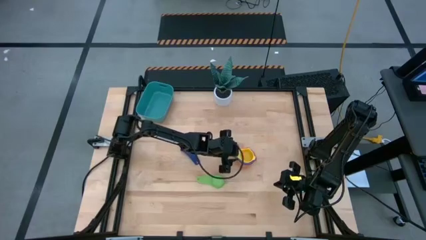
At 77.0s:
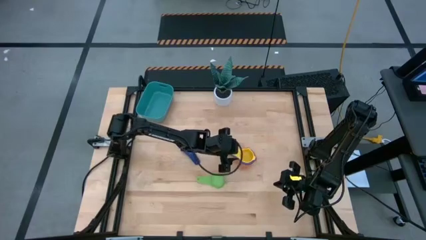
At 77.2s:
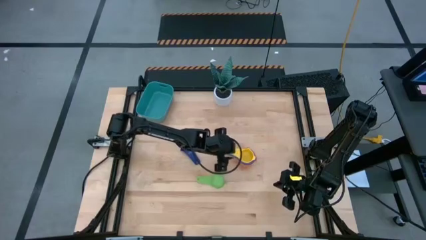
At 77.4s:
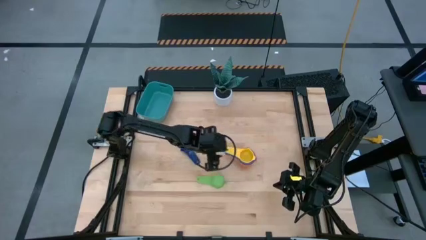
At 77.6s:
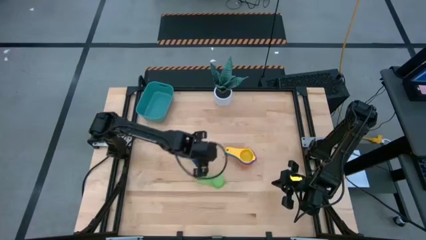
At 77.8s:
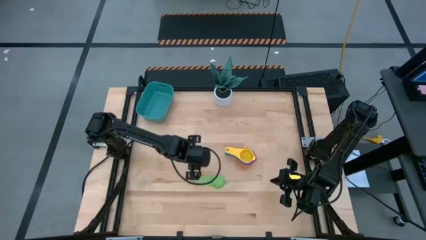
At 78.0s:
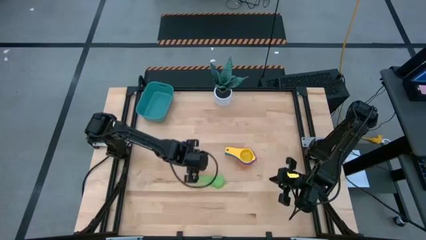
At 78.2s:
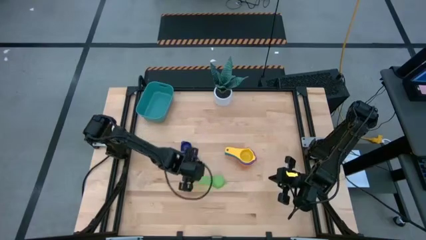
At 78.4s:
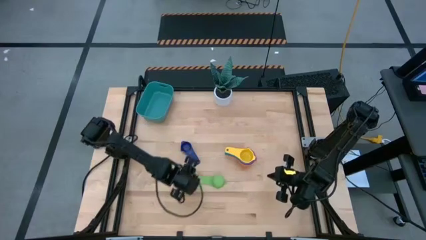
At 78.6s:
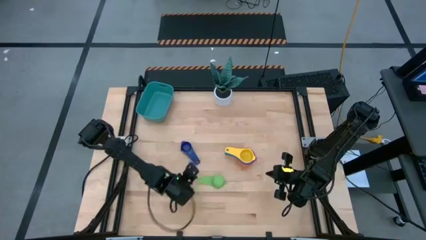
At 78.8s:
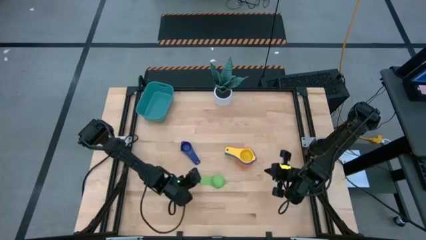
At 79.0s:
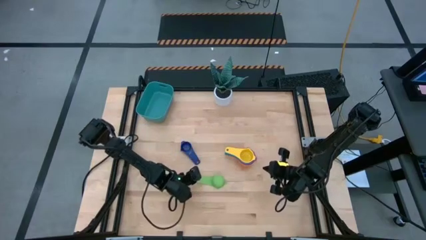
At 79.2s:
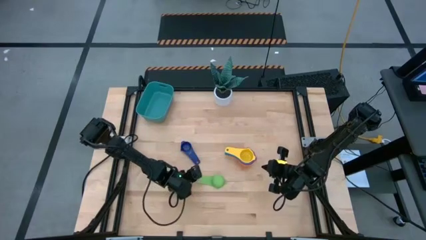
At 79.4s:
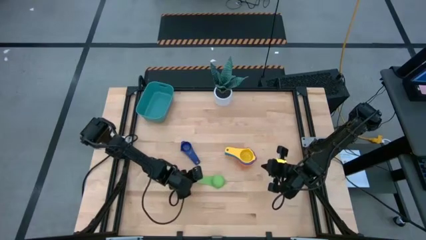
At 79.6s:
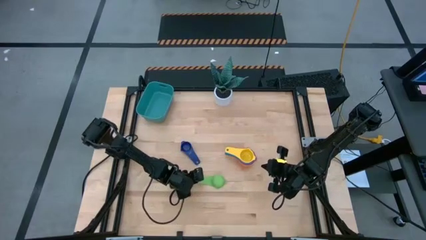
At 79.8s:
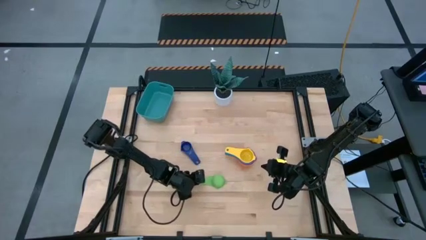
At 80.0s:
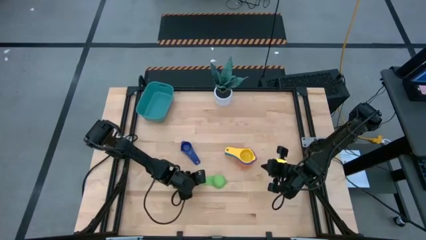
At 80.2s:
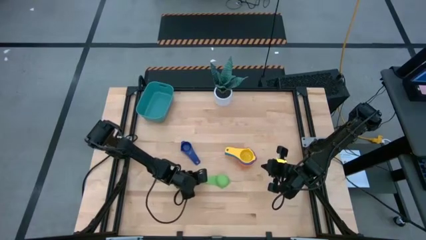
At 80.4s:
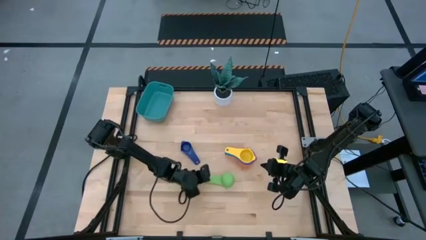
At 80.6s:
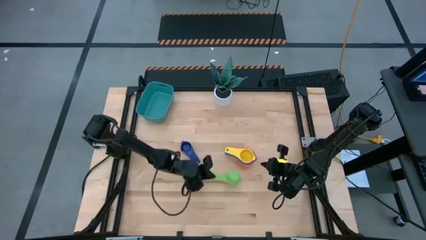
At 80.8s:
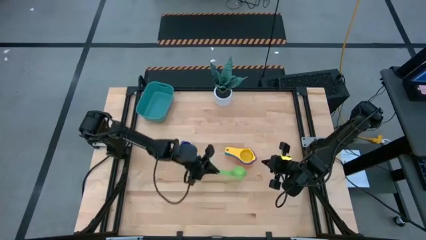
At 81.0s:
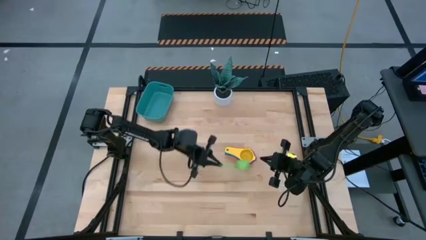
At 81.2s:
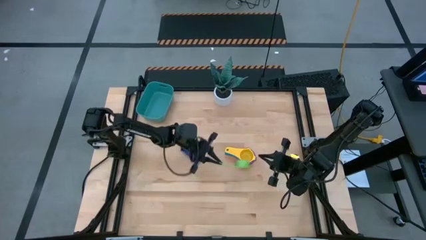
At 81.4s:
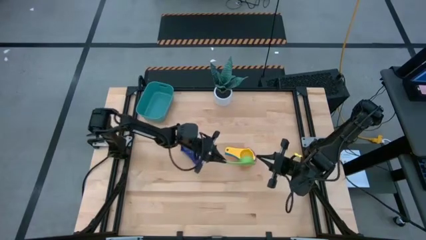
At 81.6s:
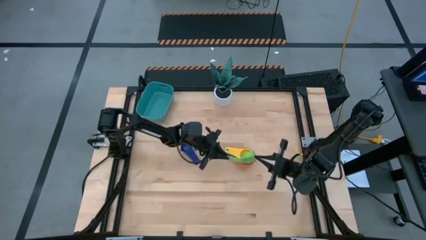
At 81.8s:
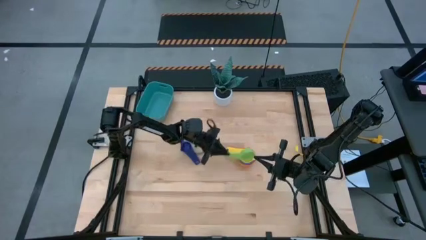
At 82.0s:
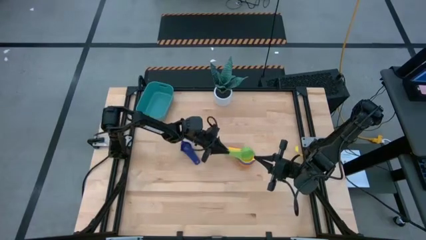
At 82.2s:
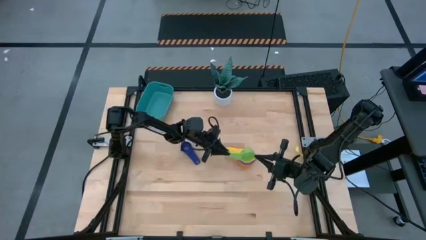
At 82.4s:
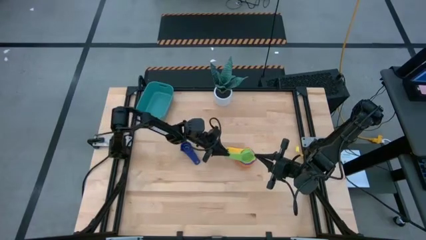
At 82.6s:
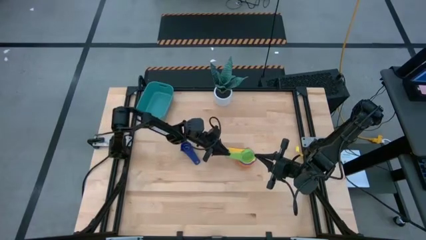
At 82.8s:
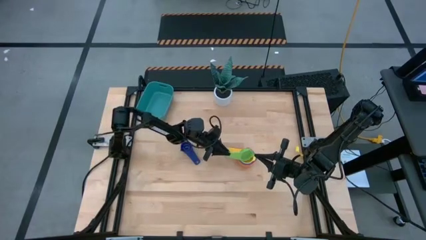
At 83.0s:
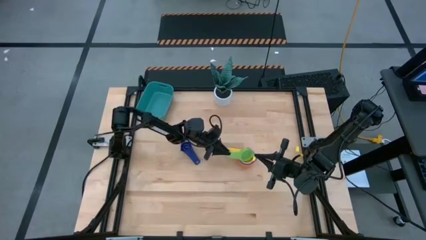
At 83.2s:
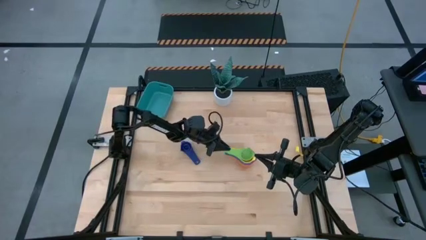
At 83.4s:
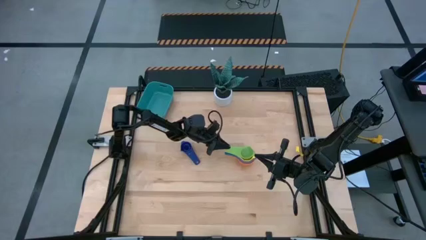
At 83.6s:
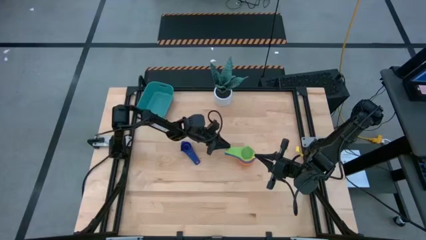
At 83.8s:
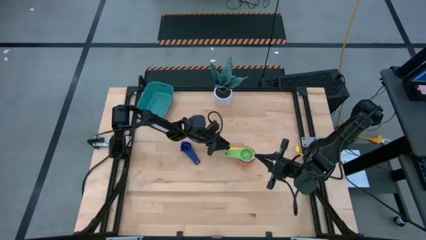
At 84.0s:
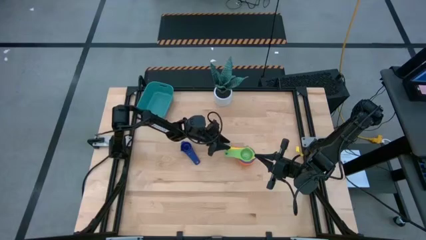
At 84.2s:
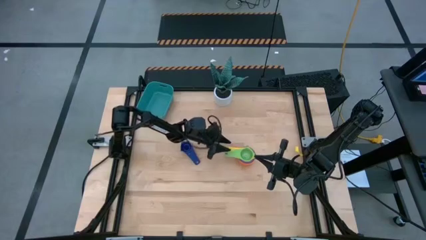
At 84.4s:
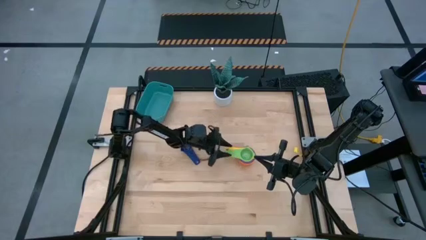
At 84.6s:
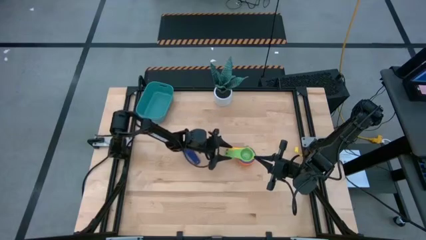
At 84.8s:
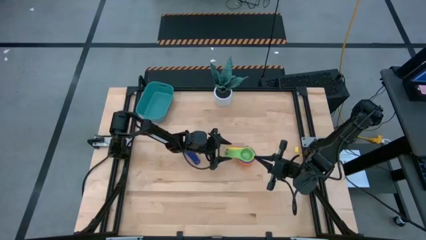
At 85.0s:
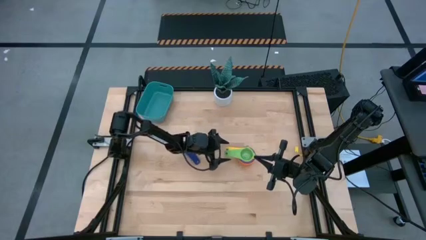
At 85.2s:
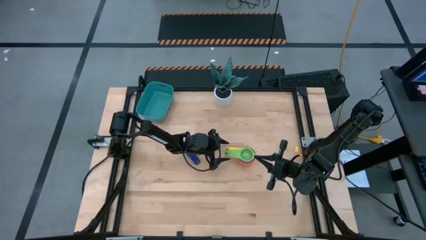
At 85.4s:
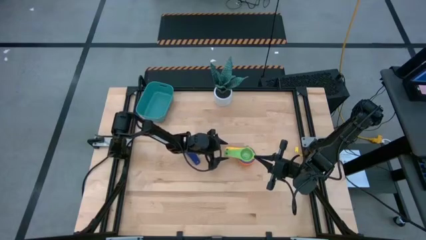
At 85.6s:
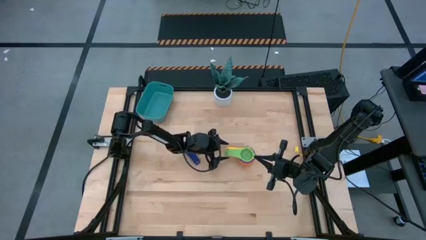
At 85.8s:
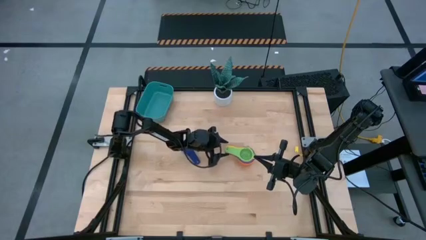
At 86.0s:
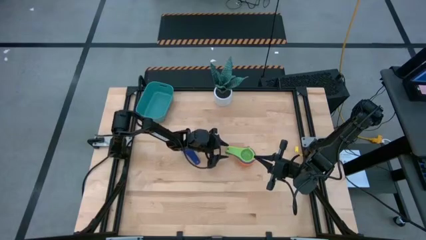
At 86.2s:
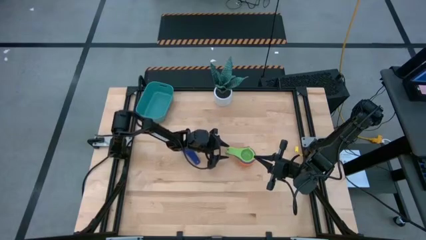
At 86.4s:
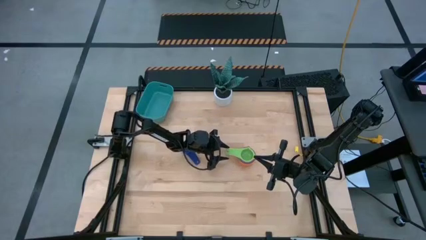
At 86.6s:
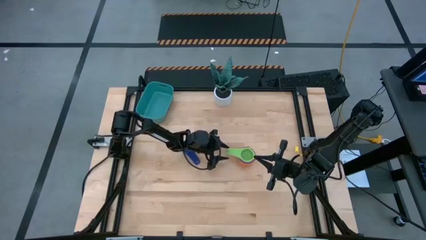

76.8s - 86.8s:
Task: Nest measuring cups in basket
Stack the green measuring cup on top of the yellow measuring cup

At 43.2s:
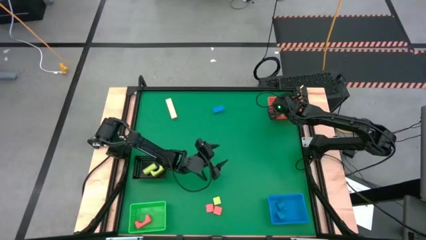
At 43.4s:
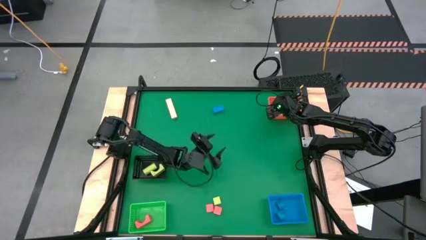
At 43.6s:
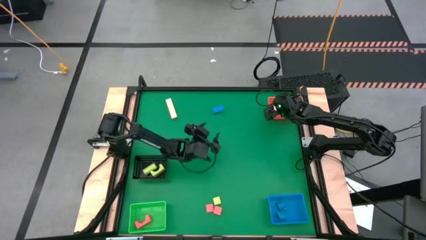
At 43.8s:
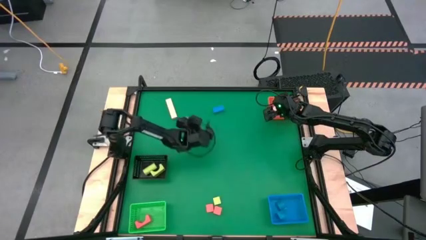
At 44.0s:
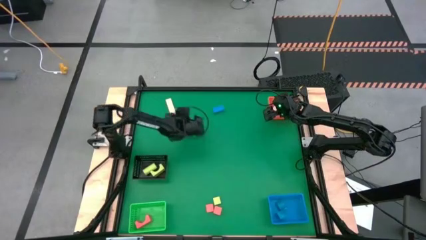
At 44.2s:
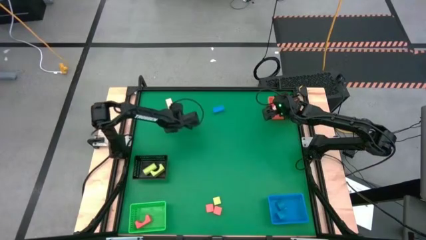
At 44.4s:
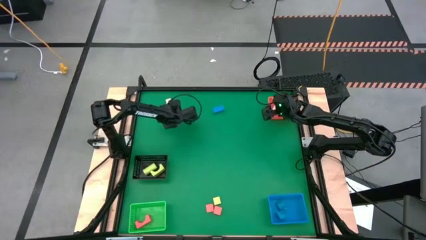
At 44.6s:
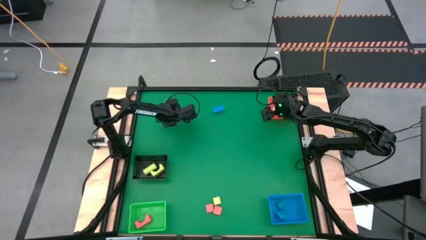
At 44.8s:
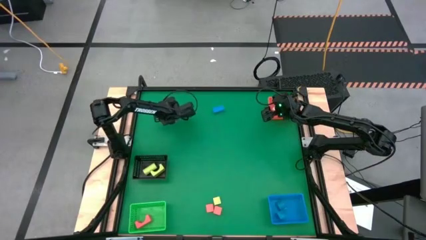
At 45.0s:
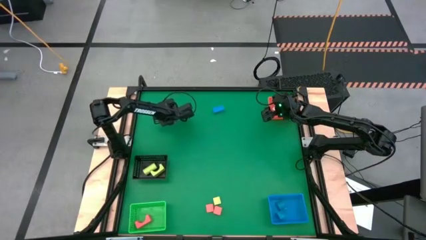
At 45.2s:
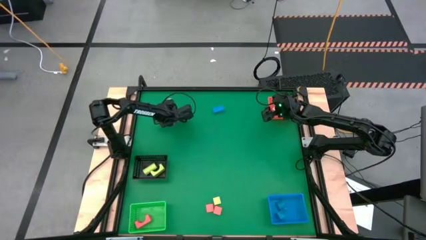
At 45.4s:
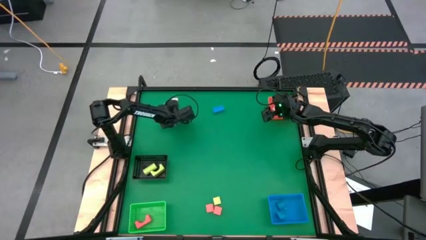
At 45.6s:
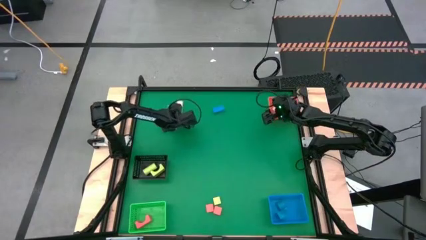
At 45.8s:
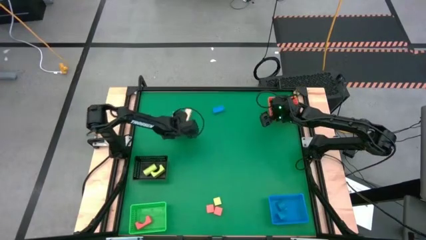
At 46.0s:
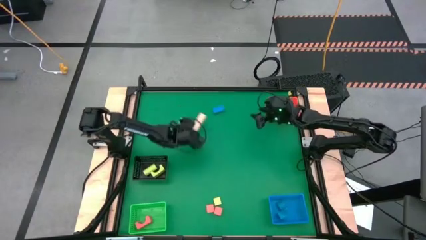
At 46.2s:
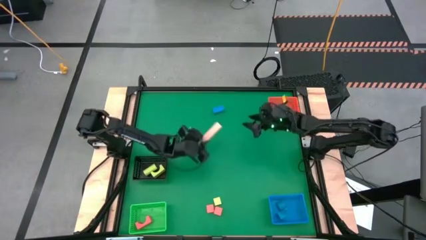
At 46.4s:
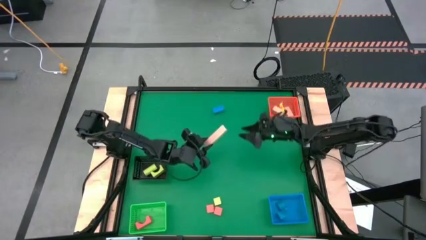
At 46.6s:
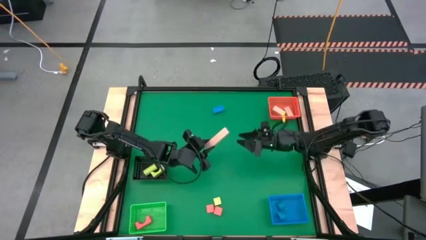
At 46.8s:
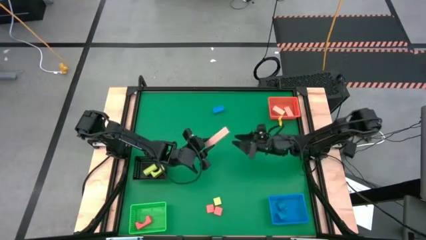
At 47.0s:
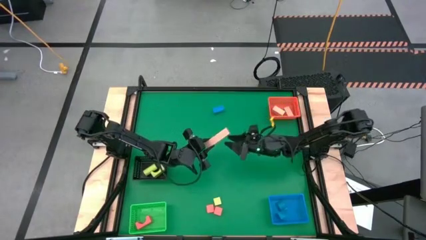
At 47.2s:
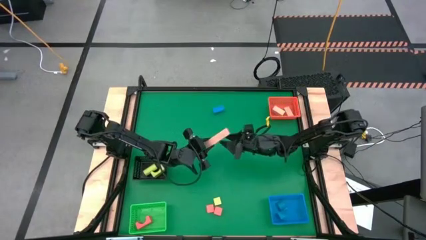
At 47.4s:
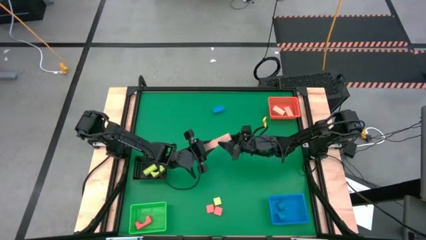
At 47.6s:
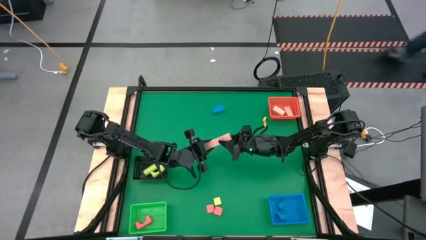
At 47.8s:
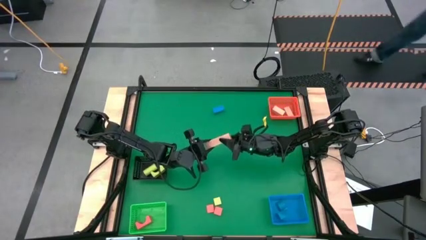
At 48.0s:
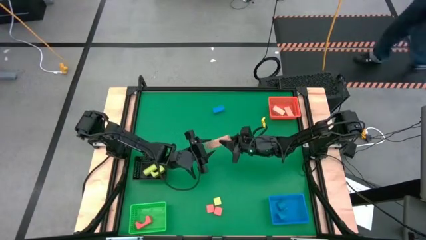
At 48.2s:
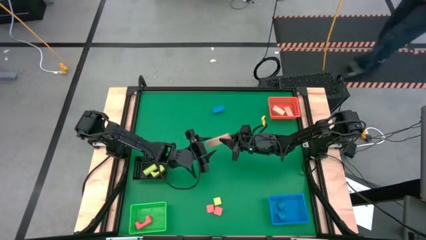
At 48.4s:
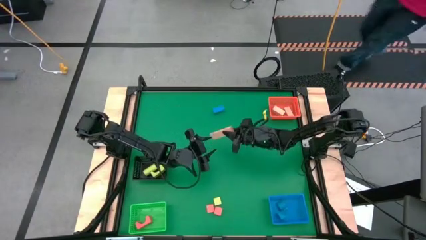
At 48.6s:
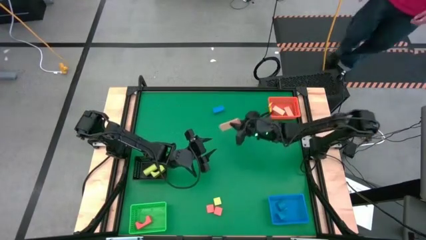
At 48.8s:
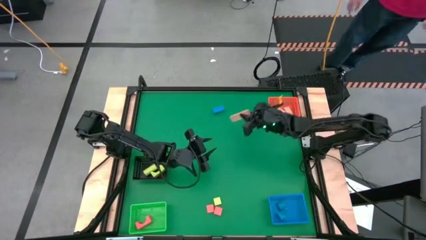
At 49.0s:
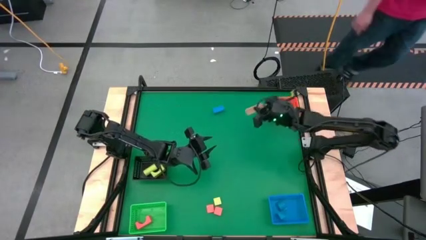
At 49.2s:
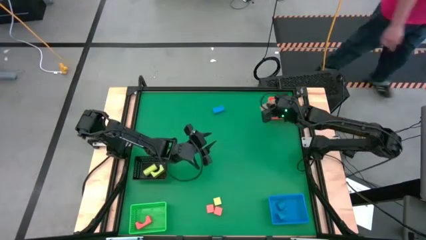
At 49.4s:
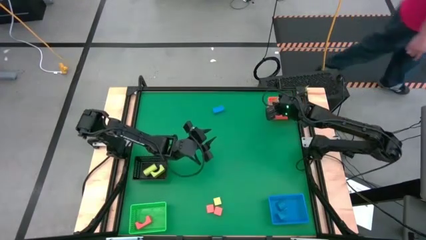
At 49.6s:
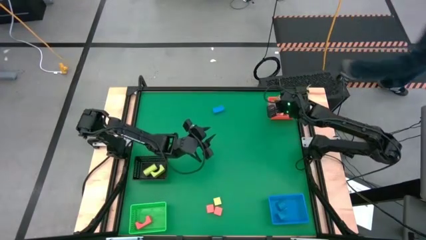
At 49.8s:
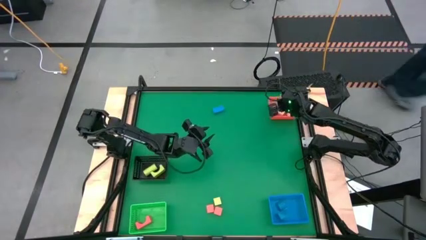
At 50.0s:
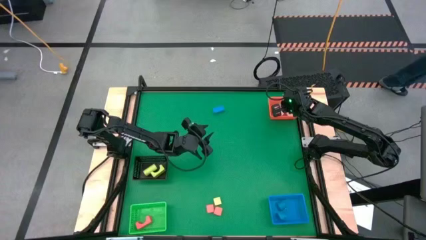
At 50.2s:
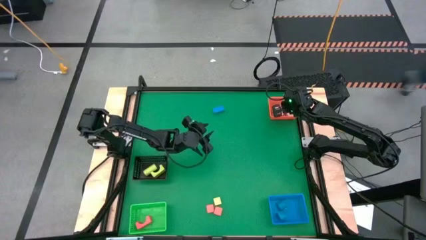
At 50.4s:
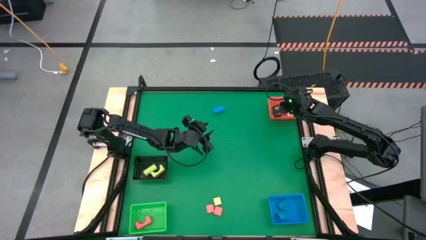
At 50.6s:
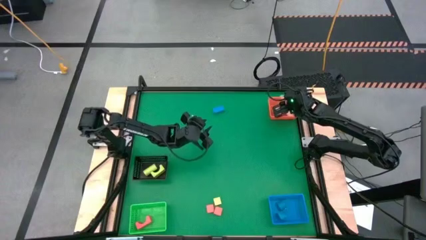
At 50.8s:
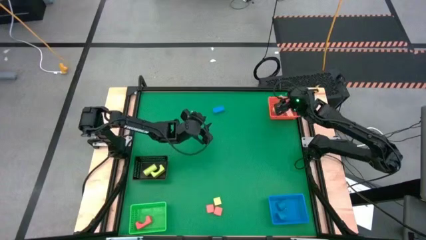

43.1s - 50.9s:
Task: Sort & place blocks by color
Put the white wooden block into the orange basket
